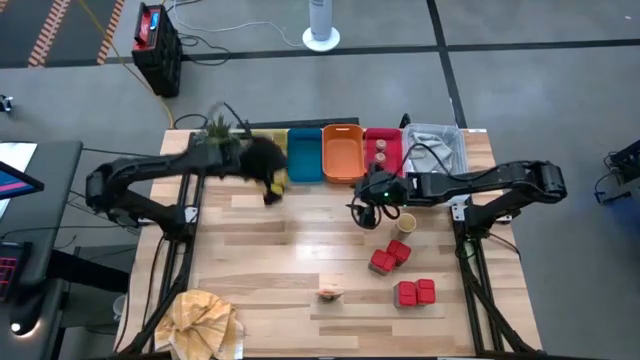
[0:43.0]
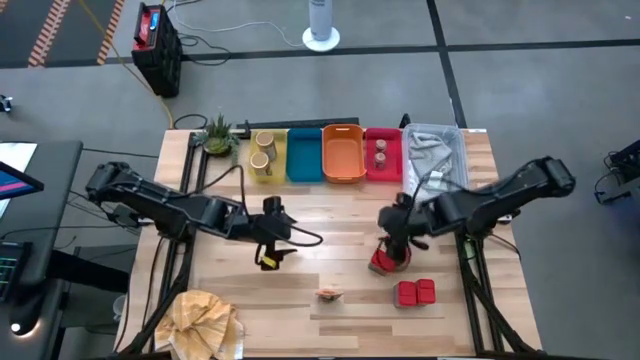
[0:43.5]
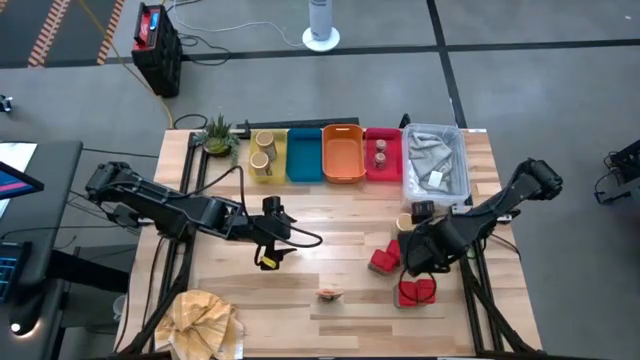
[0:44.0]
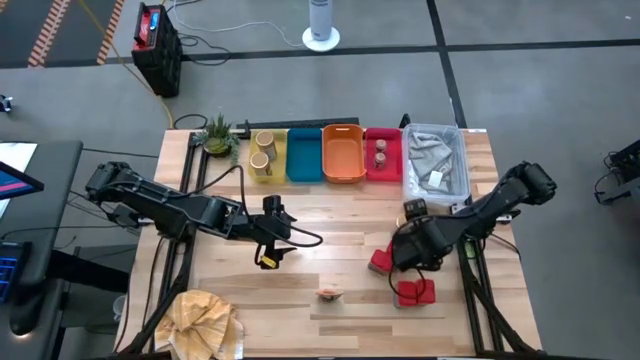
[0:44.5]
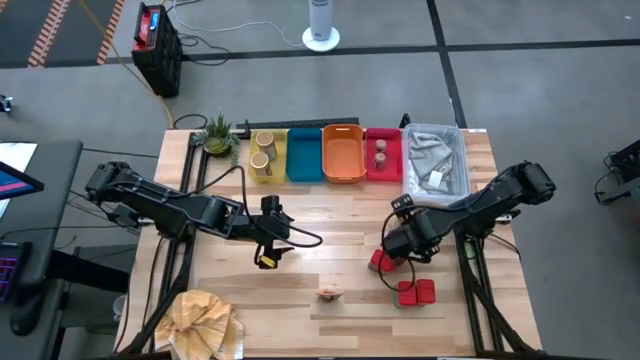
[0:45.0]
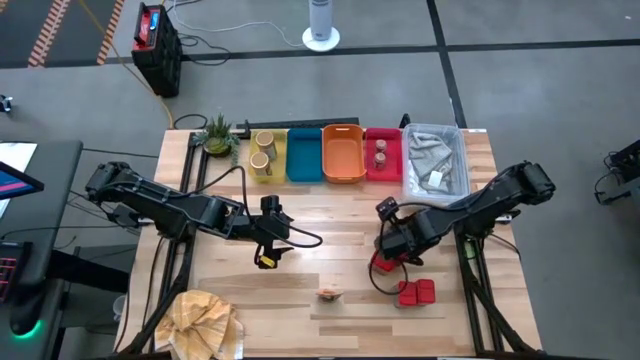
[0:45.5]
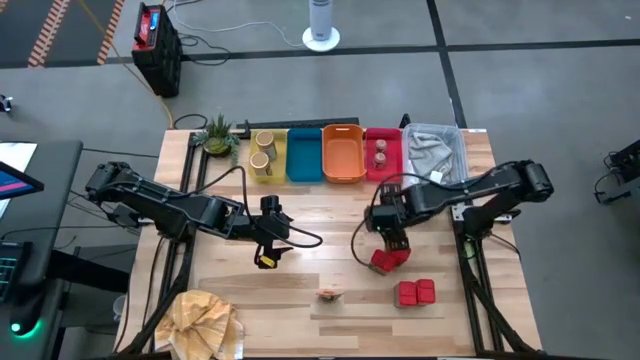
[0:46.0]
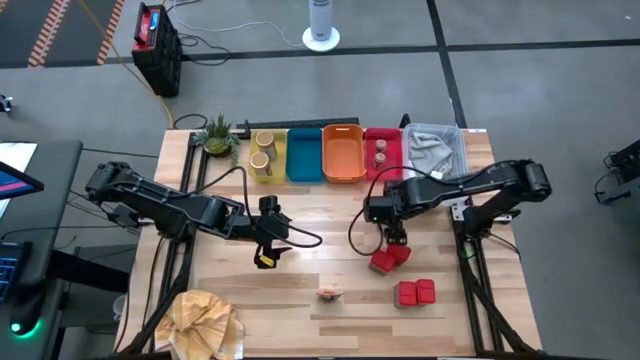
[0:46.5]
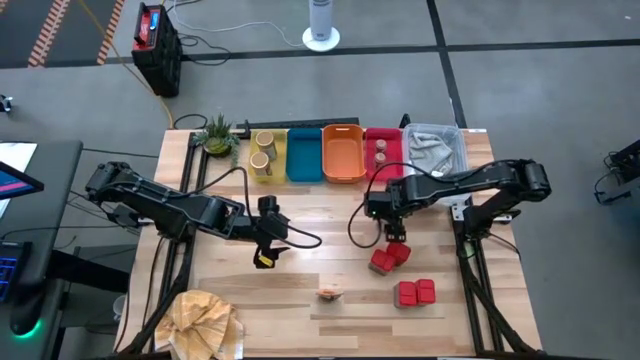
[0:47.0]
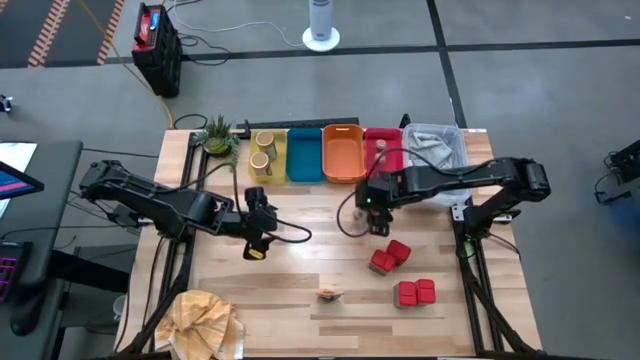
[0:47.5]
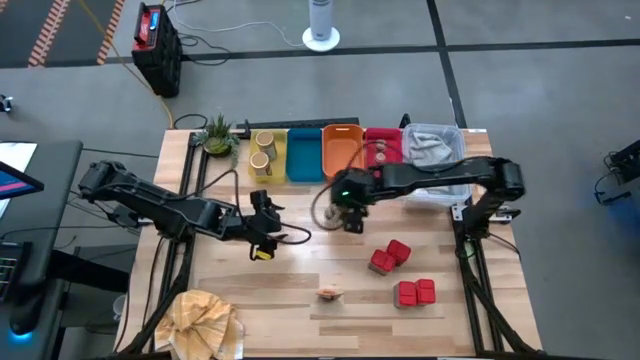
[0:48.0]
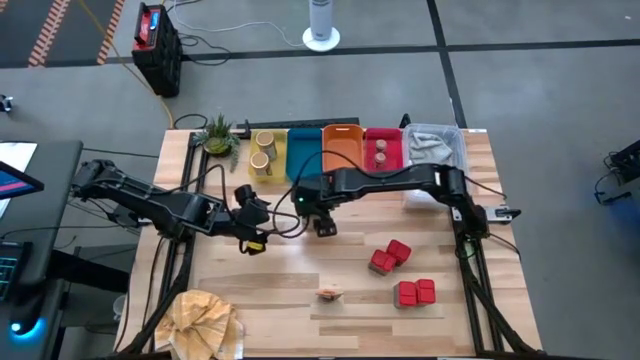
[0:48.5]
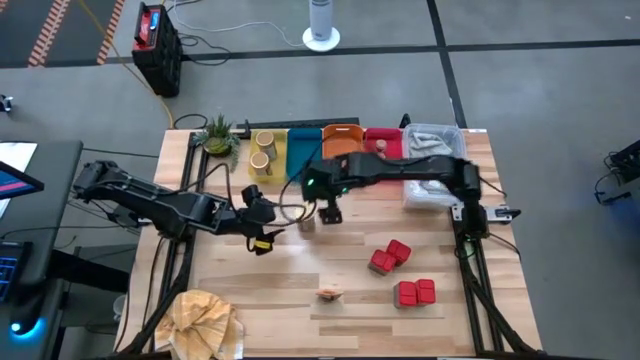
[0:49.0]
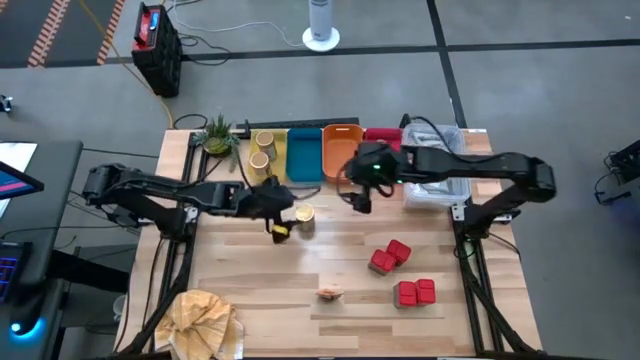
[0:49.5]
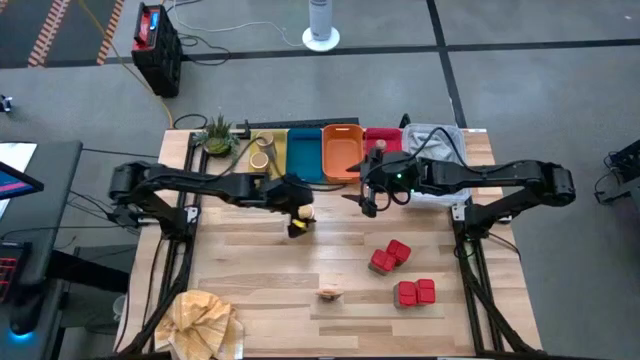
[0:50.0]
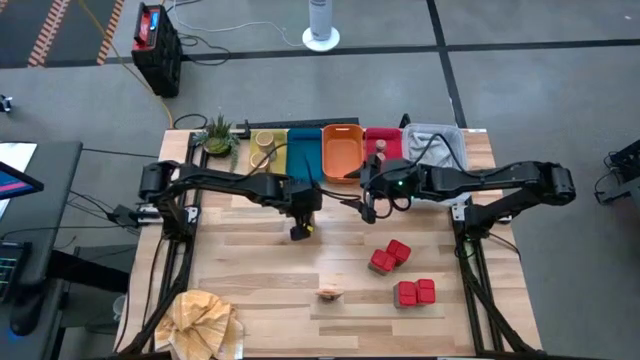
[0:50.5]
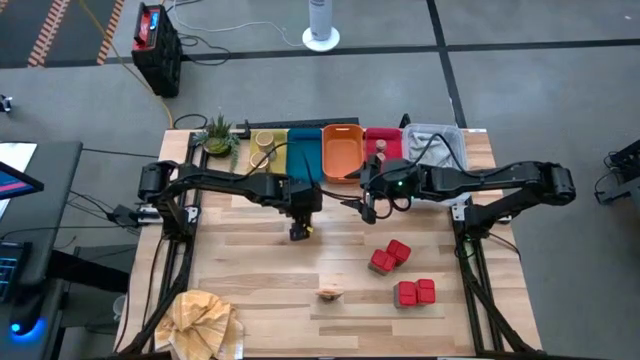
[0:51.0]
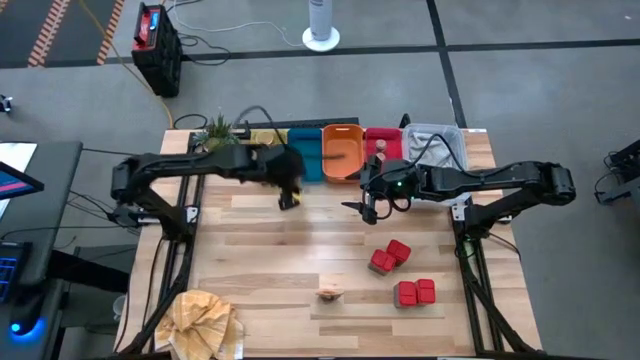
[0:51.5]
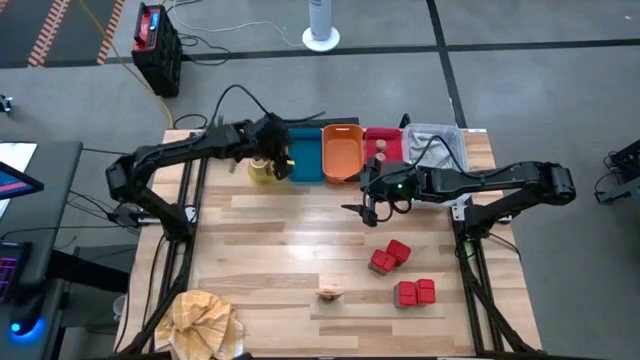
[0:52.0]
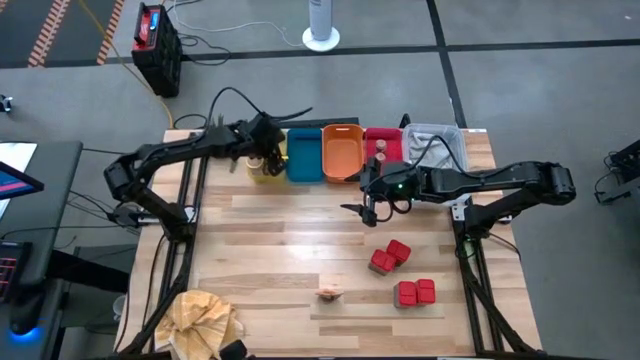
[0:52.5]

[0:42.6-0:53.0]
Task: Sort spices by type
Put the gold spice bottle into the yellow bin

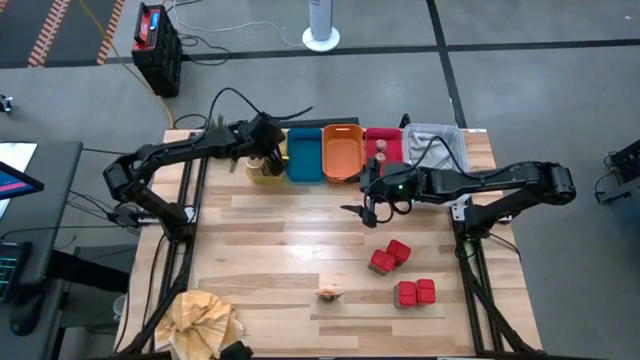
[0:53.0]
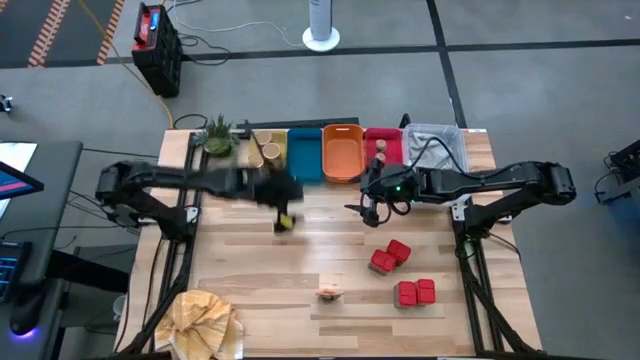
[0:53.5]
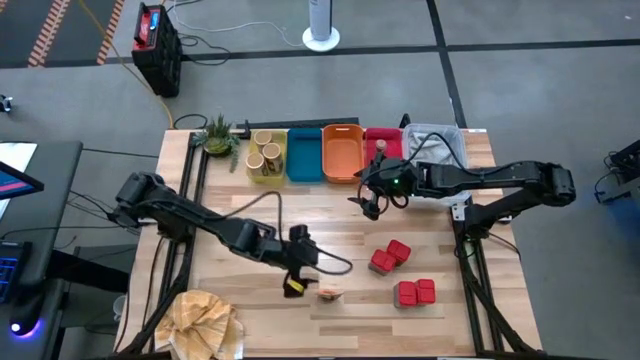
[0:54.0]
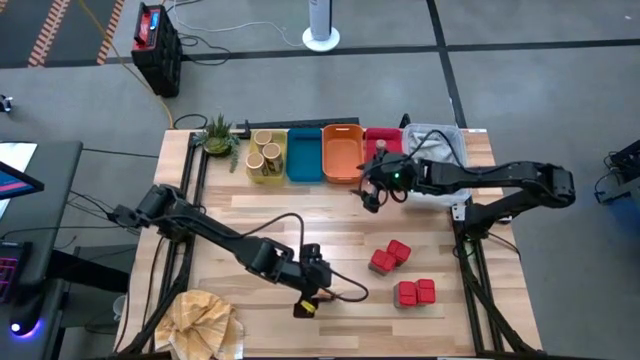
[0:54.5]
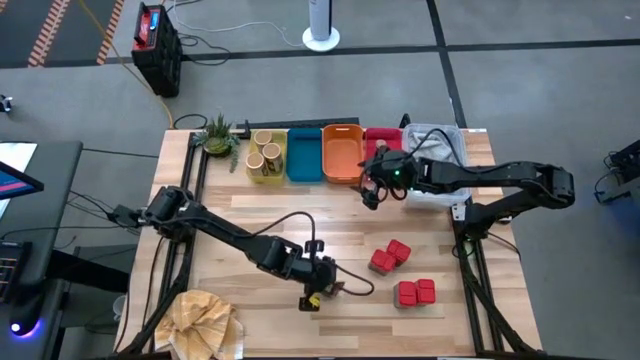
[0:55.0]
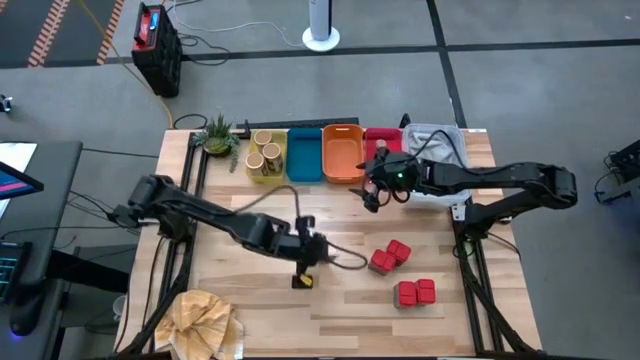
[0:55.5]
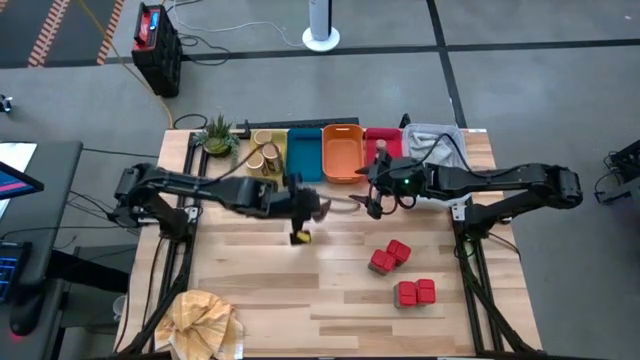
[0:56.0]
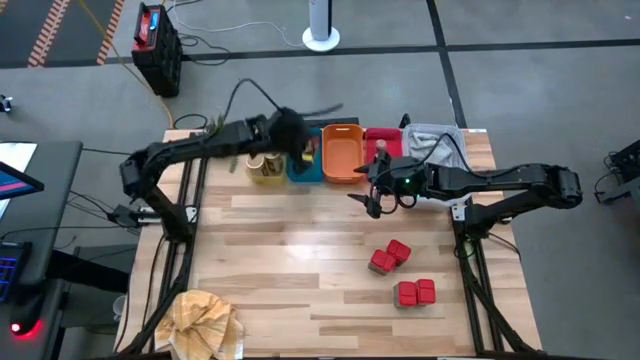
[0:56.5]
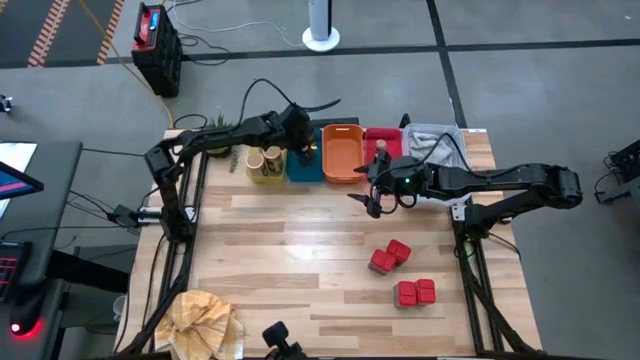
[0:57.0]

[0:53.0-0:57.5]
Put the orange seasoning pack into the blue bin

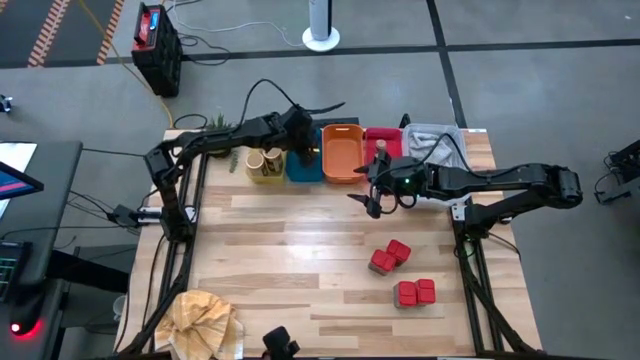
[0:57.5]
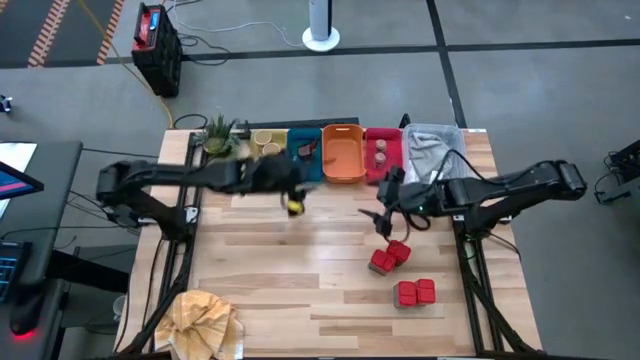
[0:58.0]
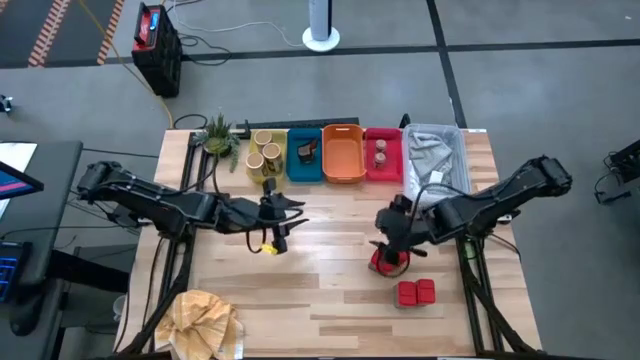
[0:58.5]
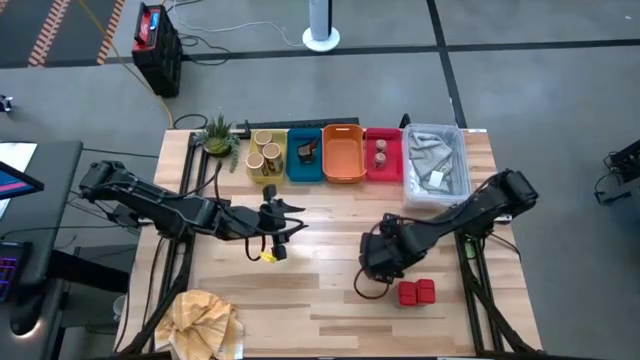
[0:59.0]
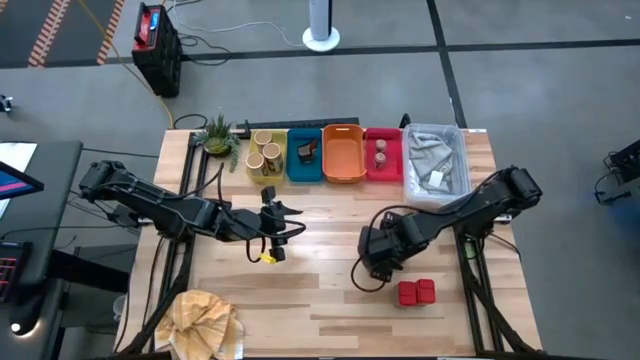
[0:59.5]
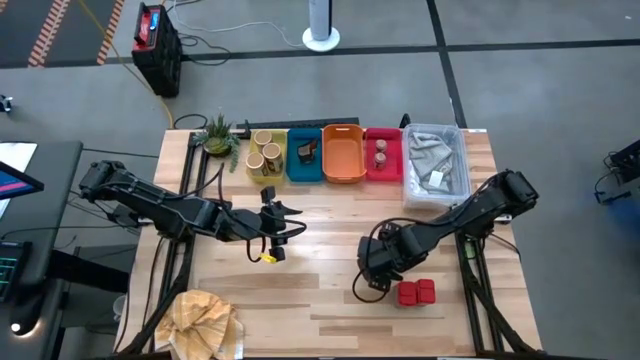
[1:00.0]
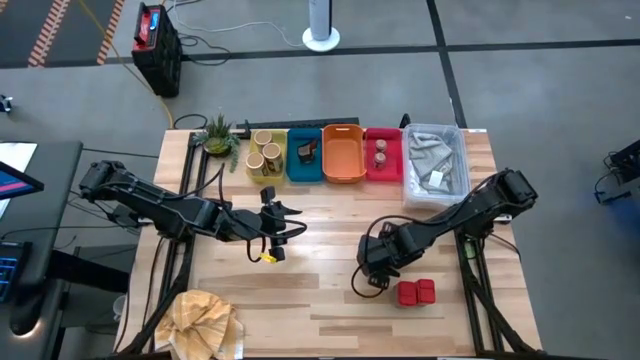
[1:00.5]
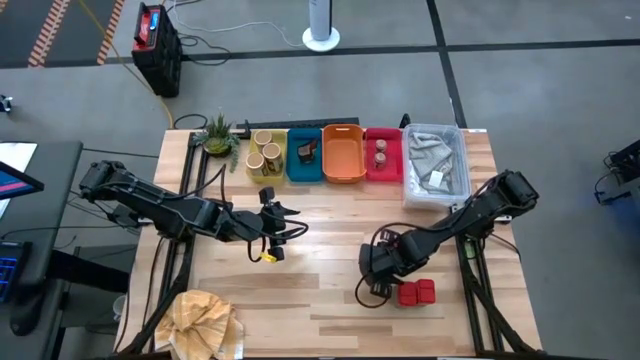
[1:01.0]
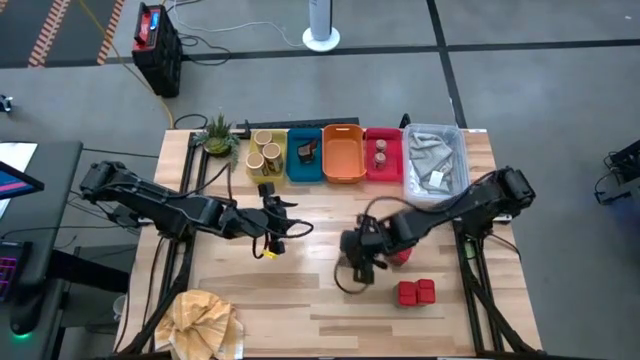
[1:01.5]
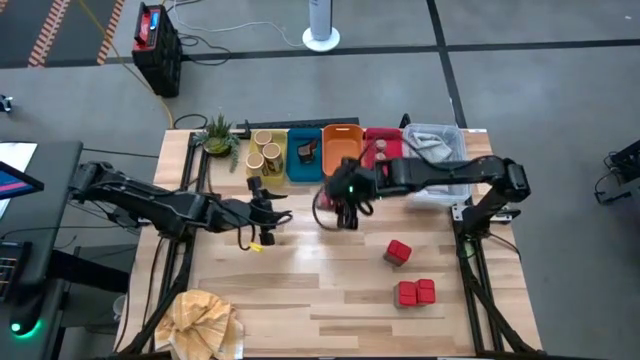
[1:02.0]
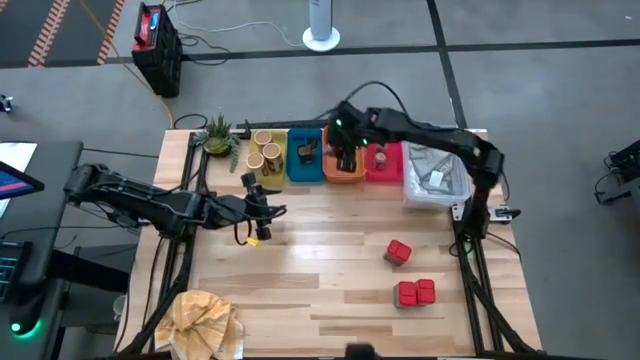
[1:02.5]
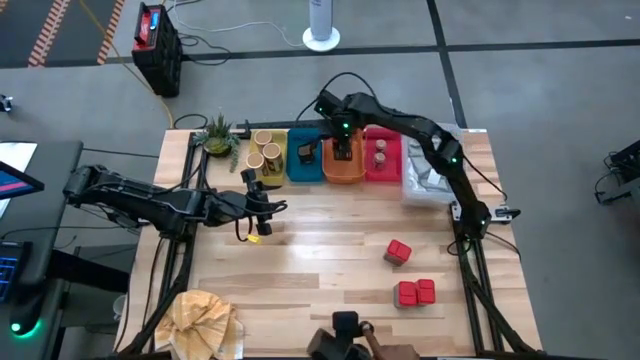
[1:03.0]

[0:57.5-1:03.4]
Put the top left red spice bottle into the orange bin

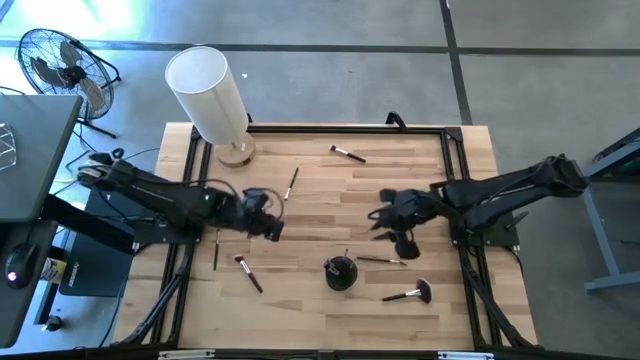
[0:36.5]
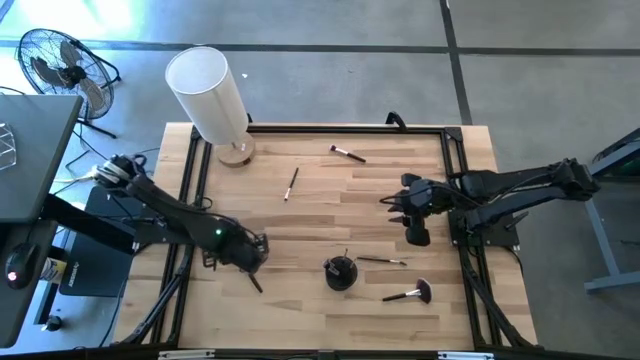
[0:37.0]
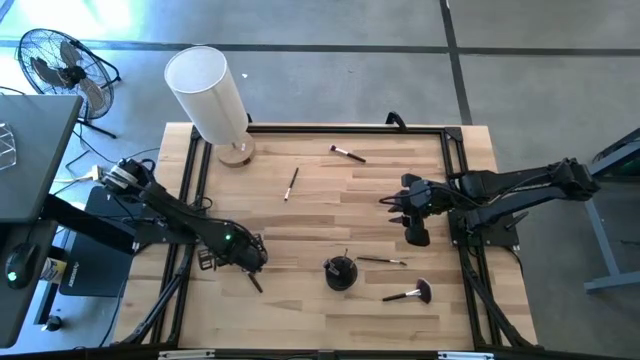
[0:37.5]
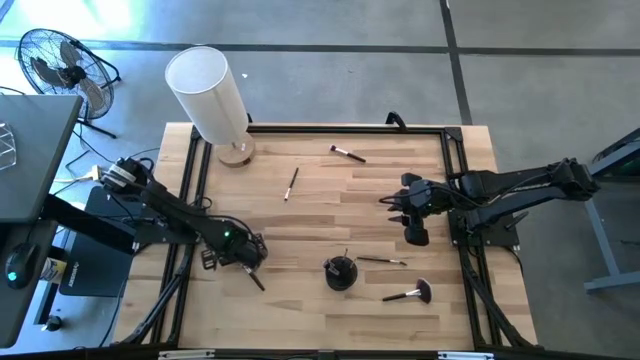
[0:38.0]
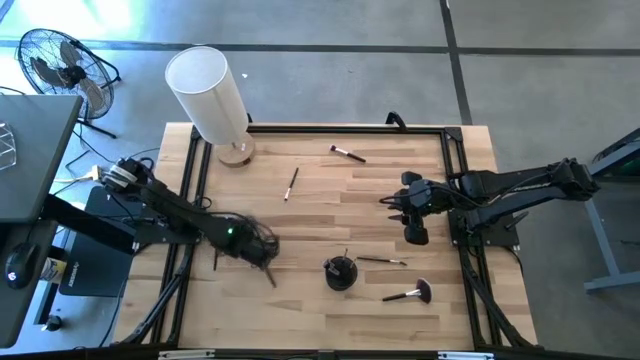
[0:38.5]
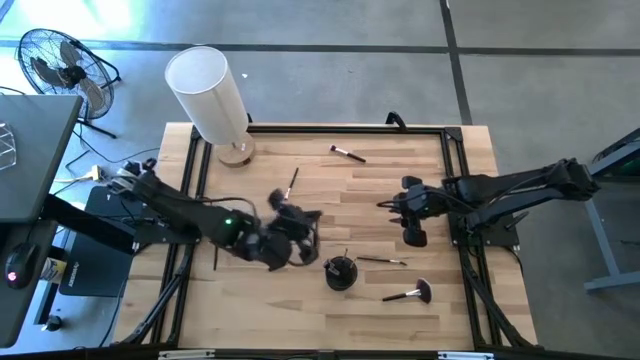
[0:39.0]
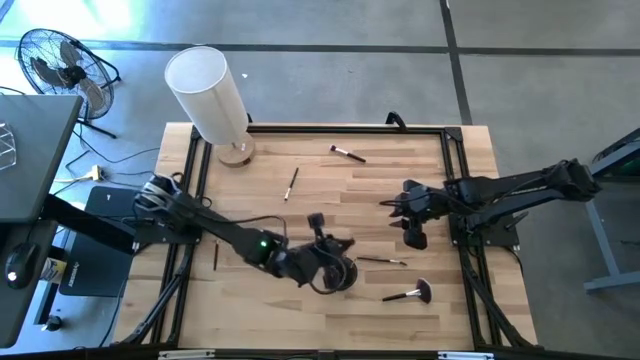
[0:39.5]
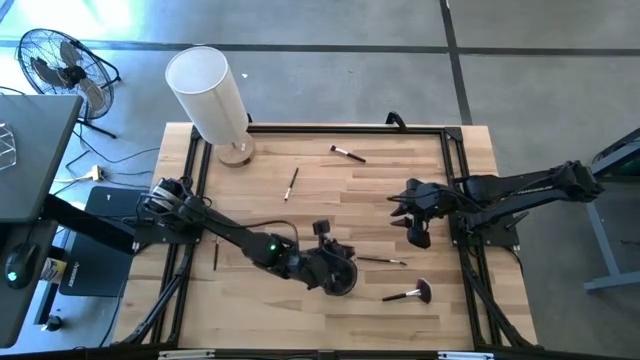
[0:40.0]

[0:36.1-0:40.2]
Task: Pick & Place Makeup Supplies
Put the makeup brush into the black makeup holder
